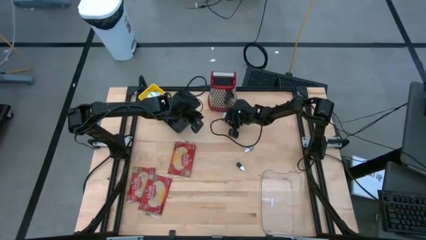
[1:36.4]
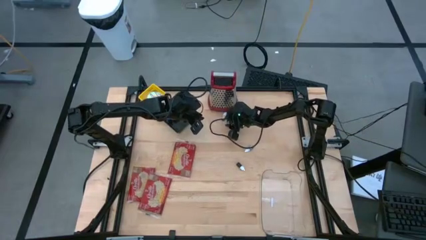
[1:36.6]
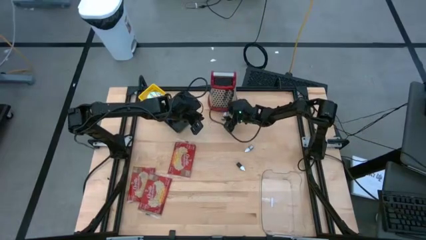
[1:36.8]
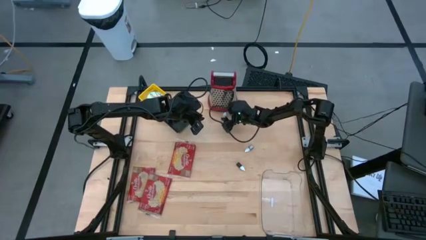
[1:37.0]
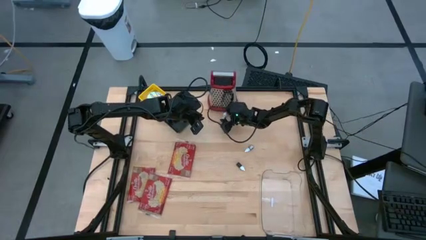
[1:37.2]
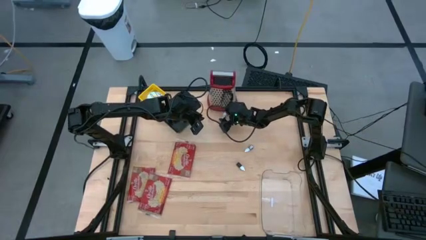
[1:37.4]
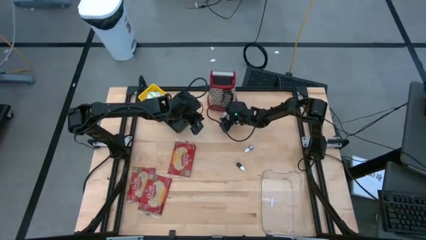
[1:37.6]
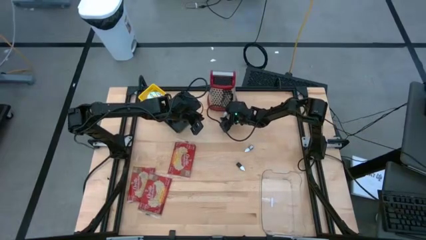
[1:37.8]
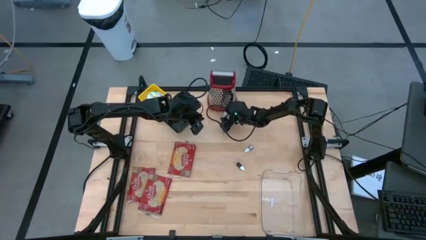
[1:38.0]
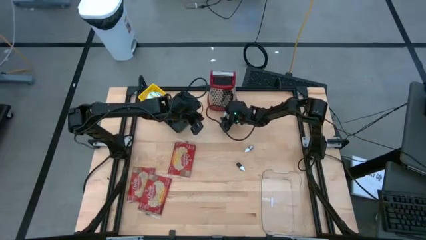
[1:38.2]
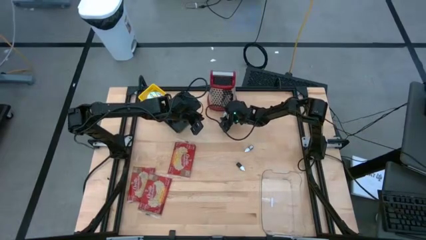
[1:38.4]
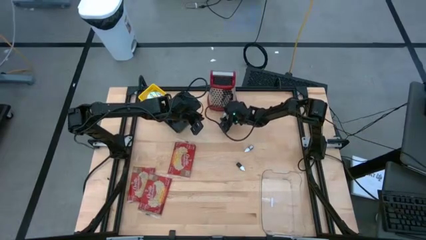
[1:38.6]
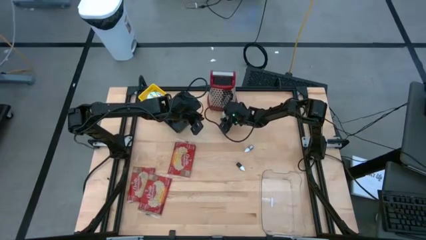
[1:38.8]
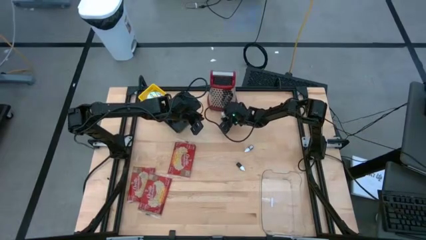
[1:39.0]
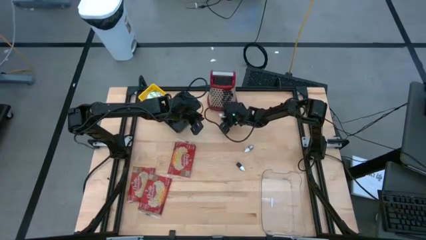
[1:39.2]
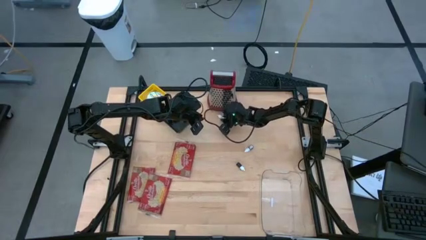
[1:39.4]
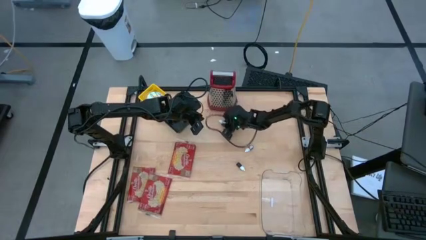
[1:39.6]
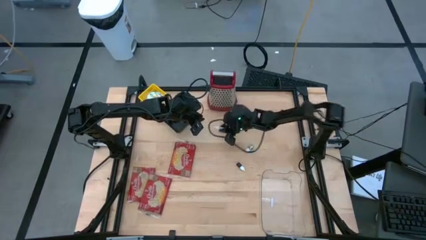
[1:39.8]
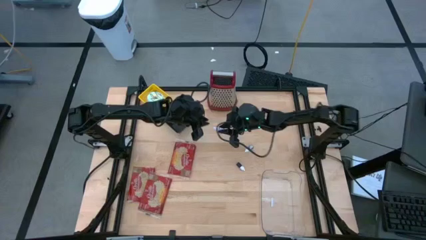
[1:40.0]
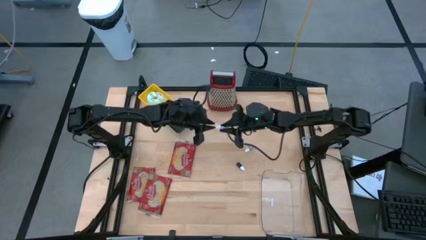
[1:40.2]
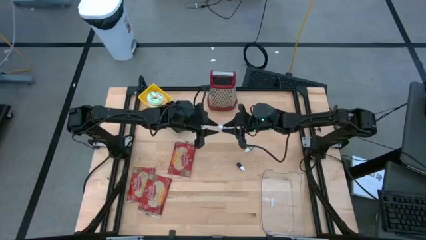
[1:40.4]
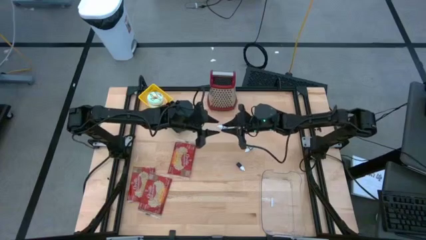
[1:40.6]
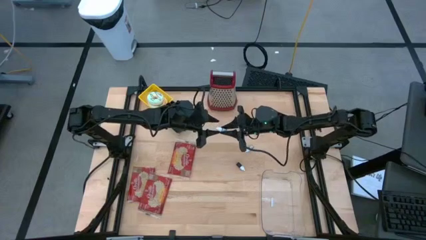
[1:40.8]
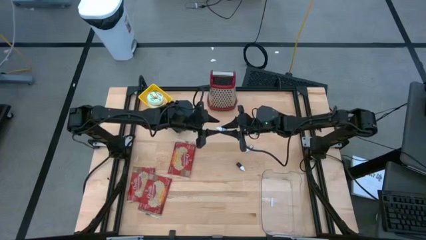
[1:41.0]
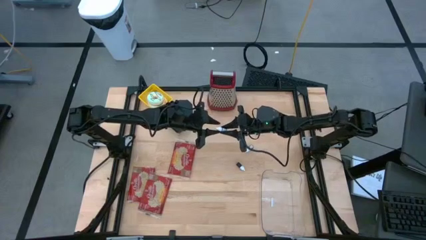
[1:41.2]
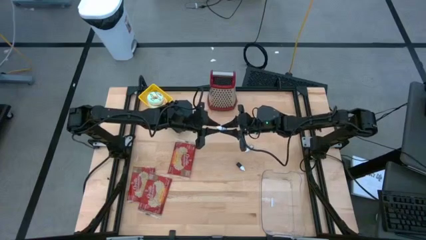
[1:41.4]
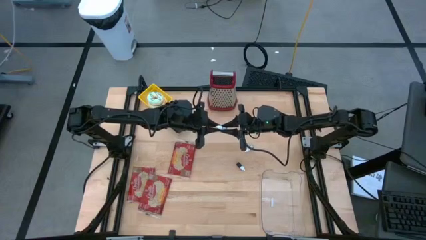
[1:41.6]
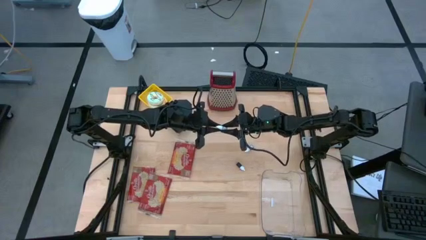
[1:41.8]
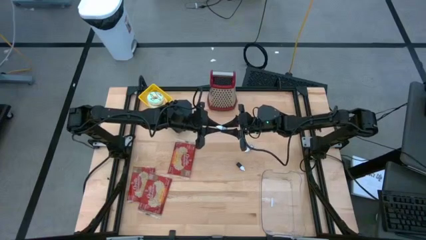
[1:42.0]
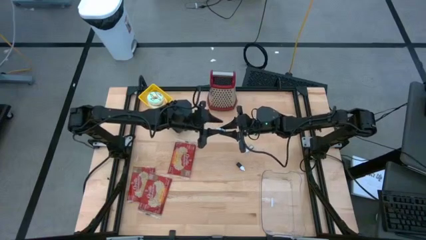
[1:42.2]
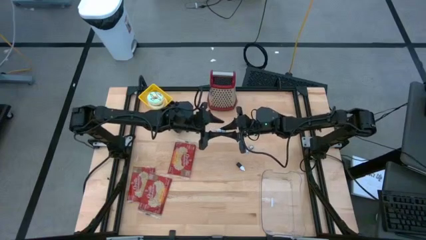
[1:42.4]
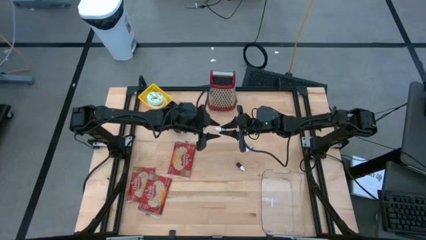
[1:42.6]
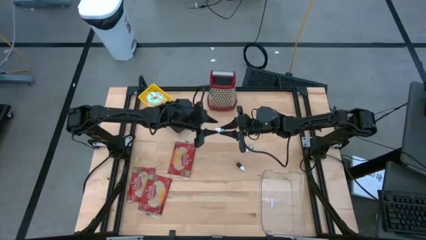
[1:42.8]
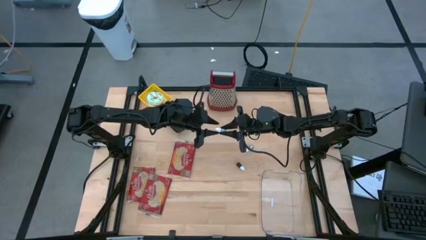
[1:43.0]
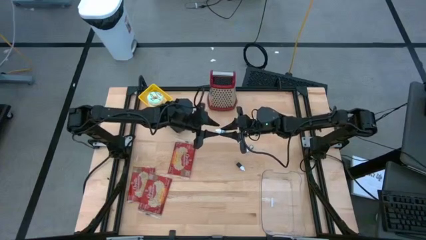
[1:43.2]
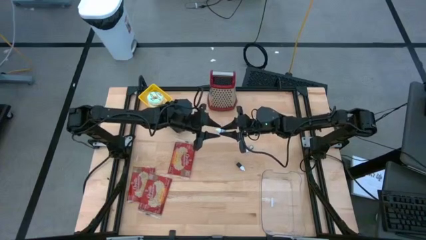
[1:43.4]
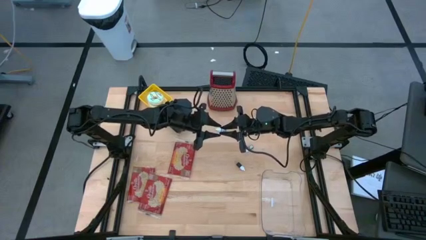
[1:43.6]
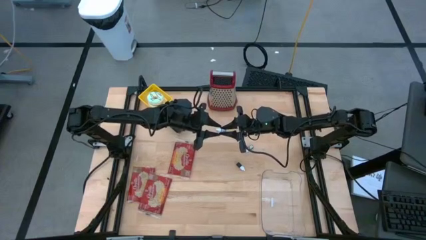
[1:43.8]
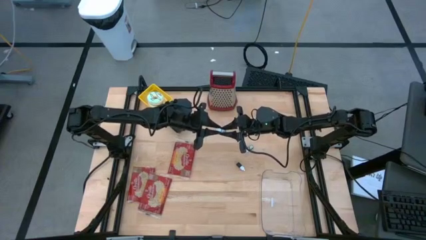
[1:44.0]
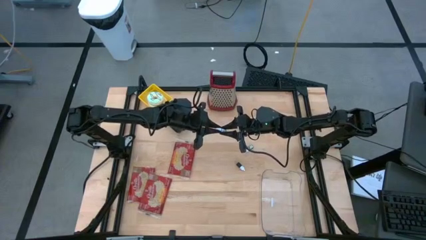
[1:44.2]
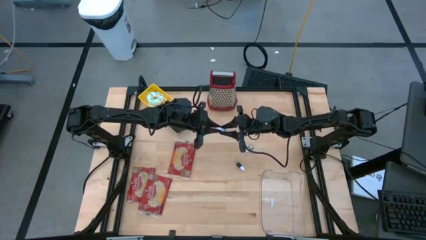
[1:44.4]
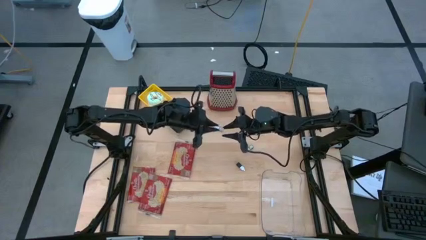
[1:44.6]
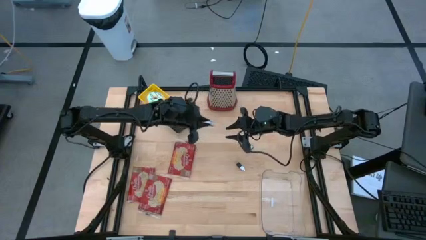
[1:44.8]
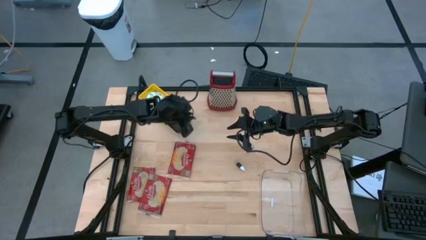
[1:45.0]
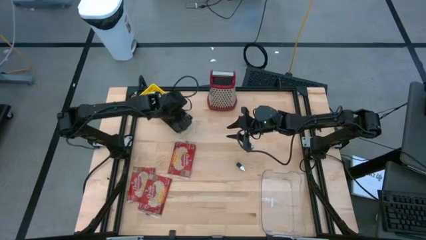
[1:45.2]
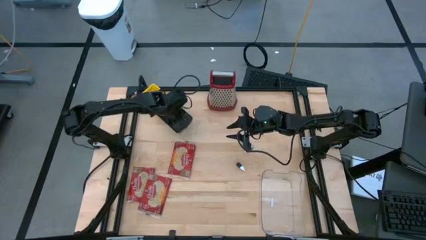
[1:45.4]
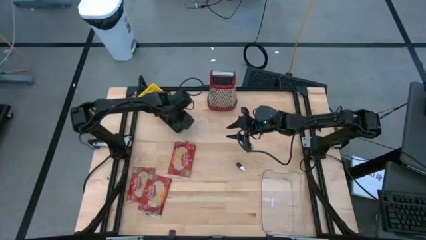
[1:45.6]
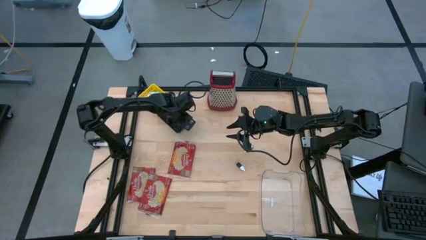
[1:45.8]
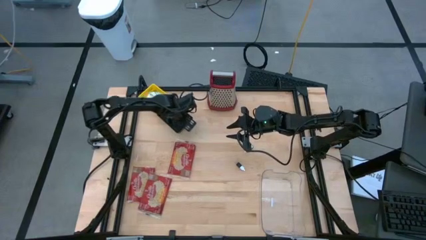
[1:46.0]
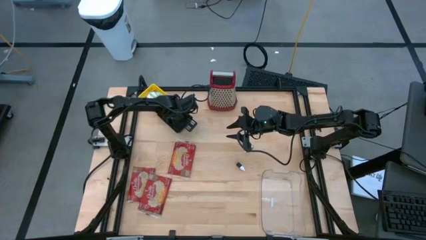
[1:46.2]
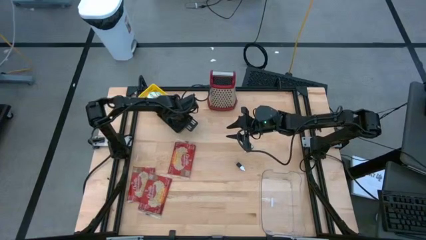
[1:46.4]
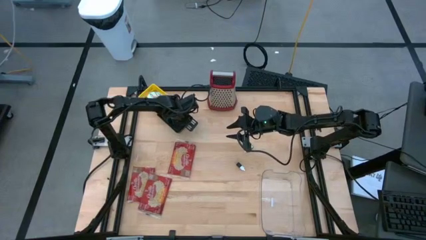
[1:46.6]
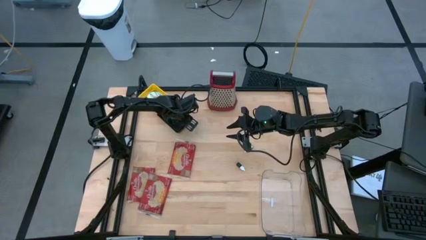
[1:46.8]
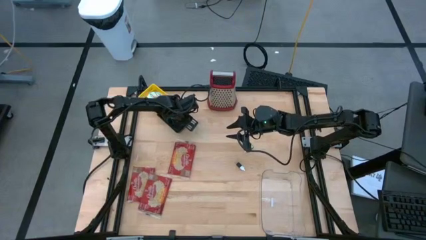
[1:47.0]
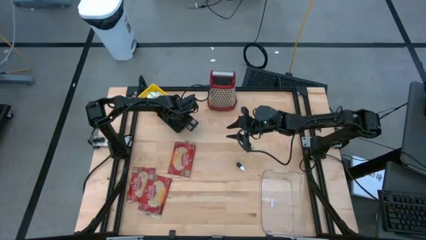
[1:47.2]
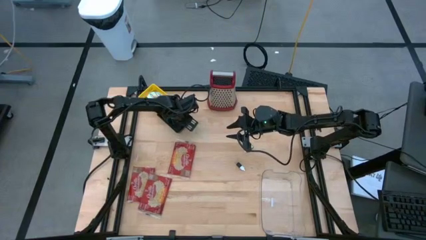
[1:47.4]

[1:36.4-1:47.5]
Put the top green food coloring bottle into the black bin

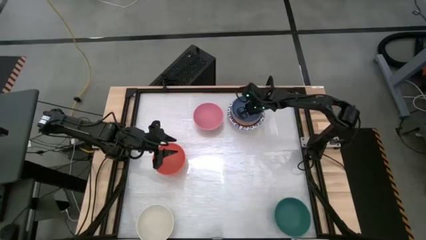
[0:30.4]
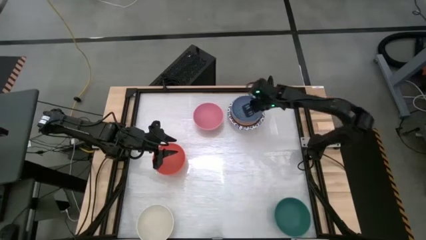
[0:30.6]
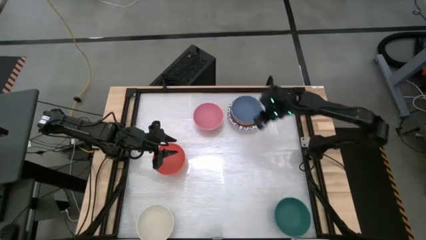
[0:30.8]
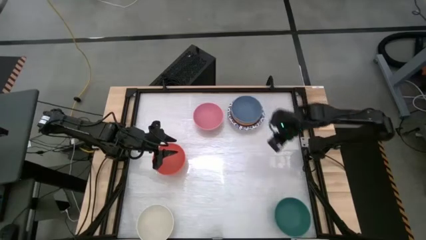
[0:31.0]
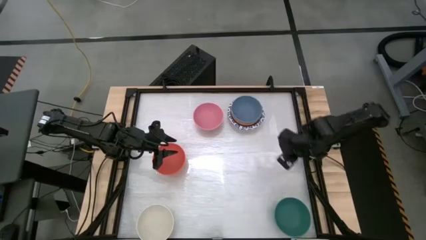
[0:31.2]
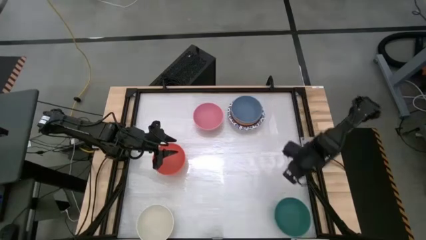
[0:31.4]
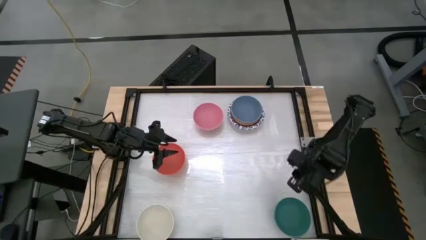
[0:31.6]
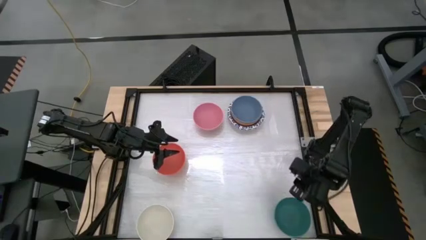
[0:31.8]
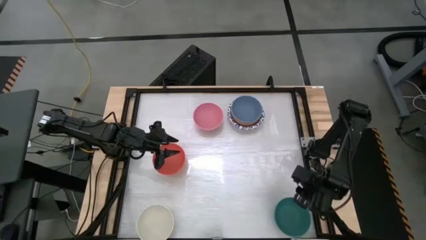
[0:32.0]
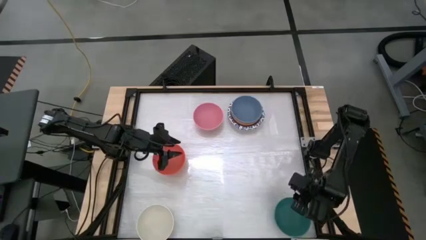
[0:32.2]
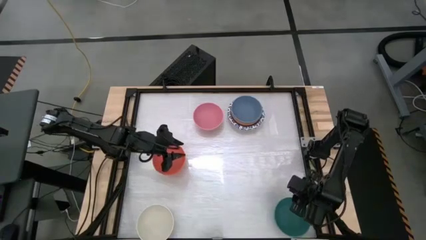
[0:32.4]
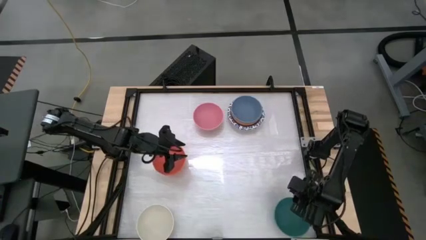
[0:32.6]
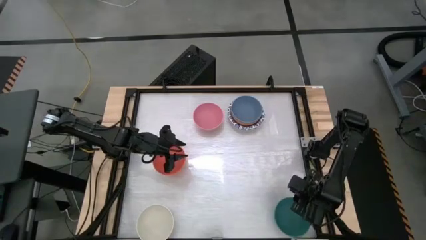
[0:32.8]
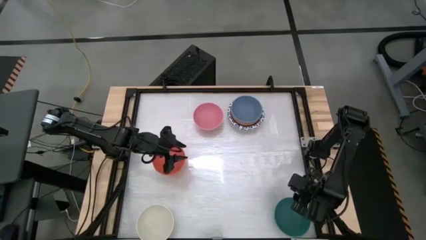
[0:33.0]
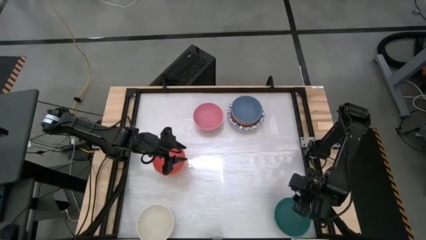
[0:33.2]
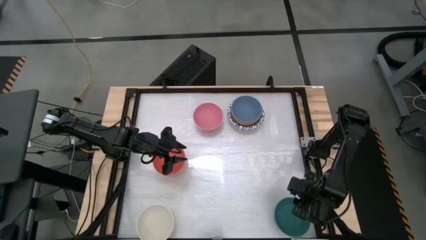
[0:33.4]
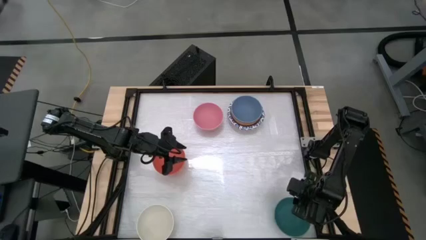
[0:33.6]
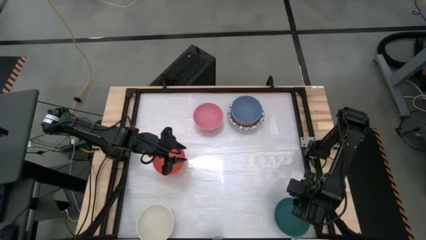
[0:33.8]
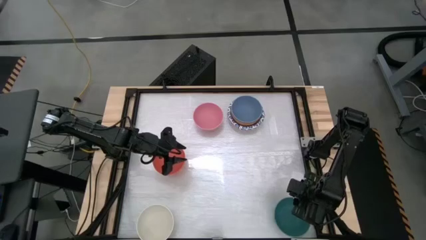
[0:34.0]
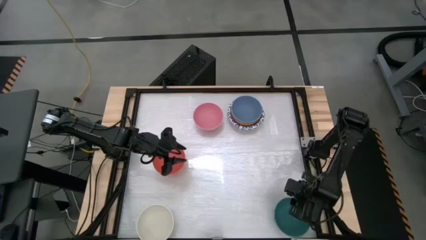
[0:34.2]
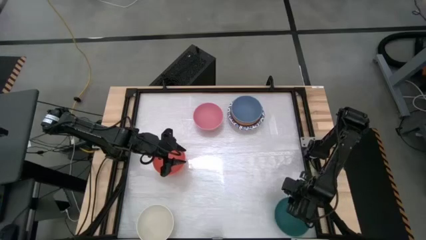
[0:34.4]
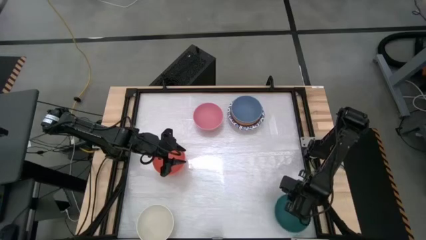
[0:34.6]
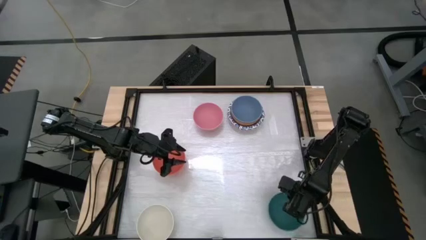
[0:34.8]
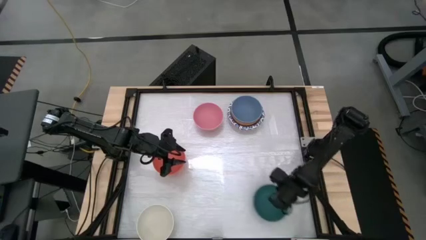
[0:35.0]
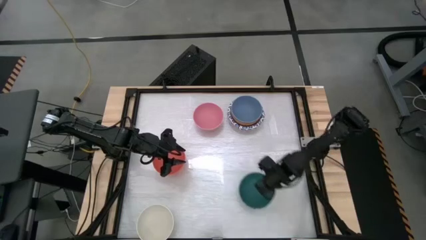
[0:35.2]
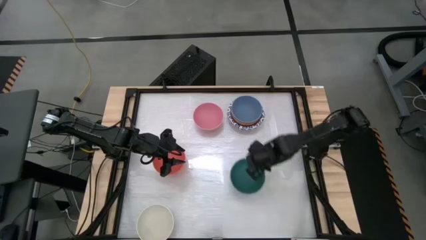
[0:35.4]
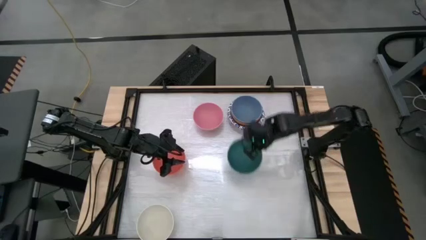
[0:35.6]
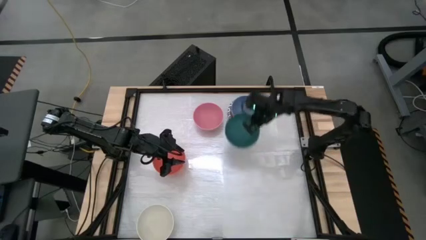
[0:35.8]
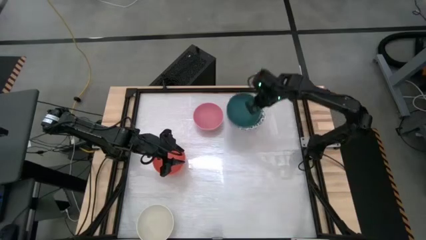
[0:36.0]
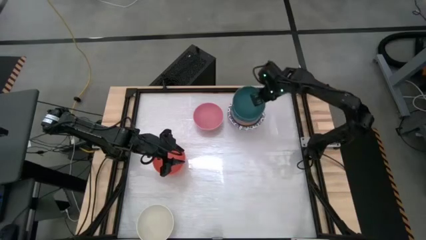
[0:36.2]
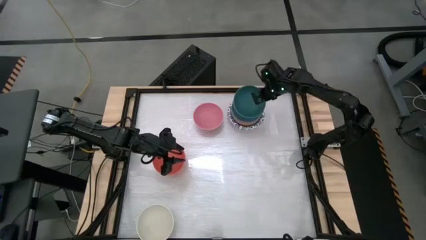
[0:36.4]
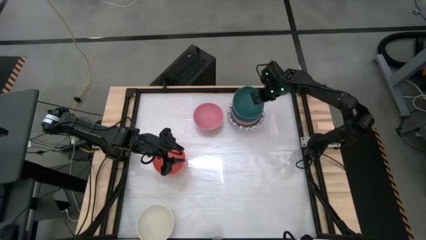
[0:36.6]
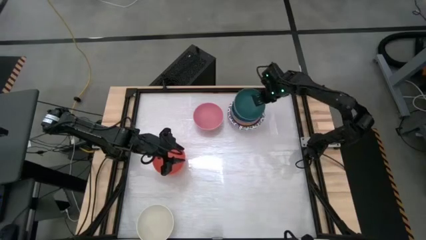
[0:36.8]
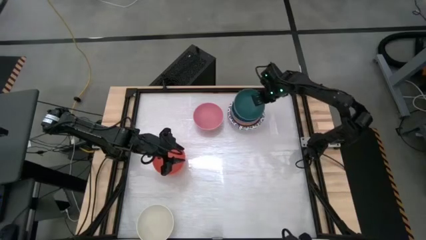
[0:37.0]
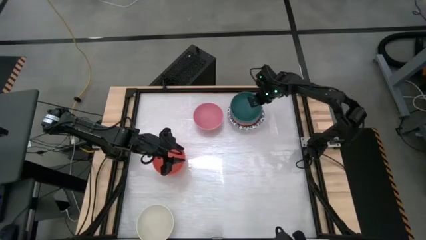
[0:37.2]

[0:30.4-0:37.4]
Stack the green bowl into the blue bowl
